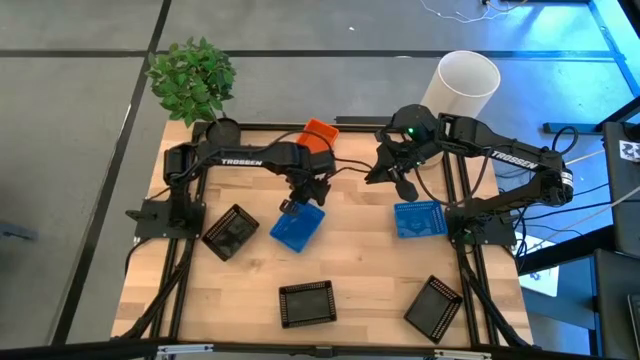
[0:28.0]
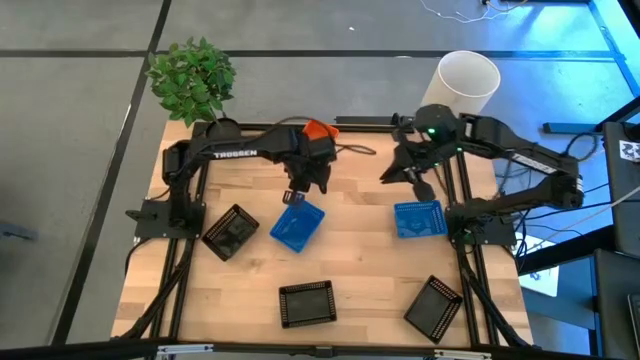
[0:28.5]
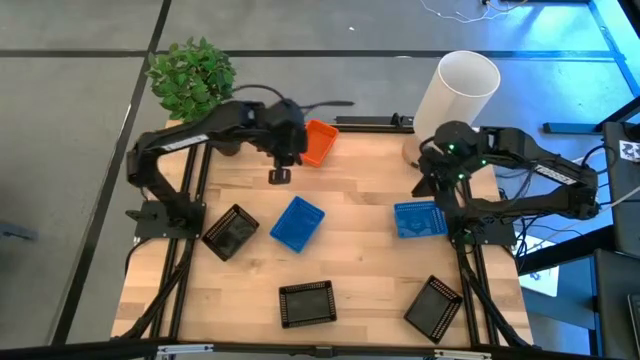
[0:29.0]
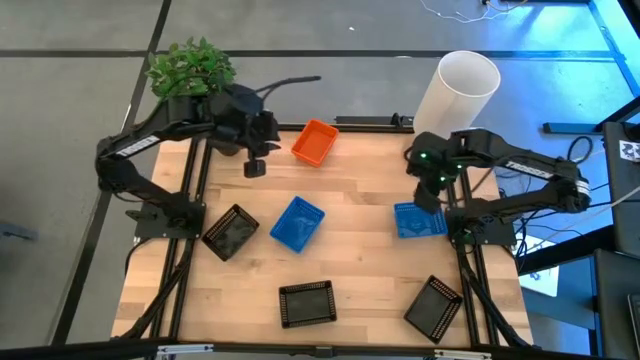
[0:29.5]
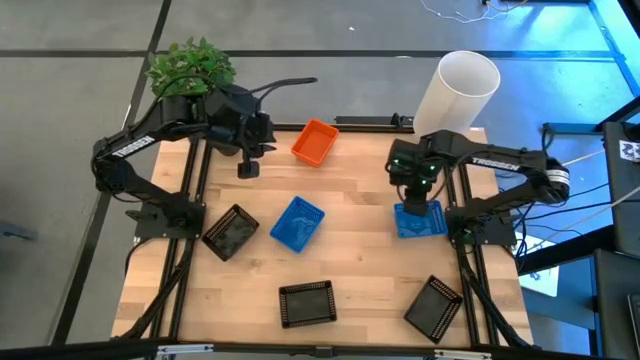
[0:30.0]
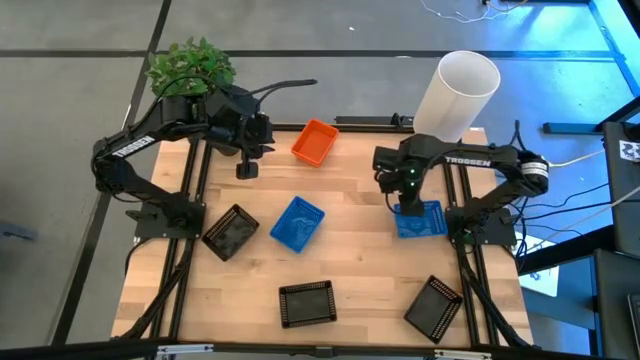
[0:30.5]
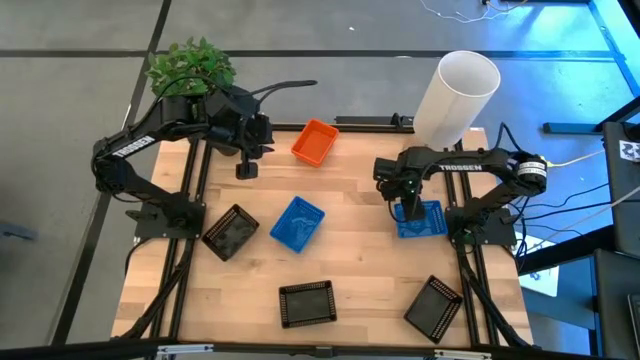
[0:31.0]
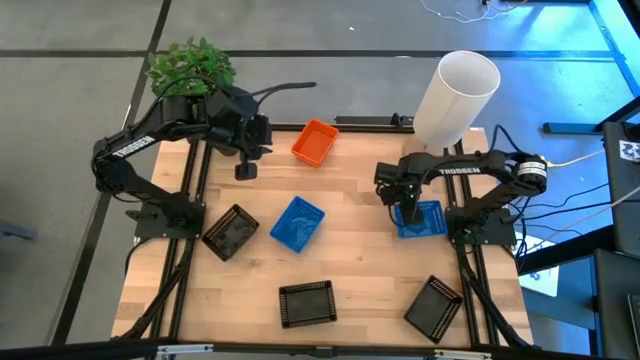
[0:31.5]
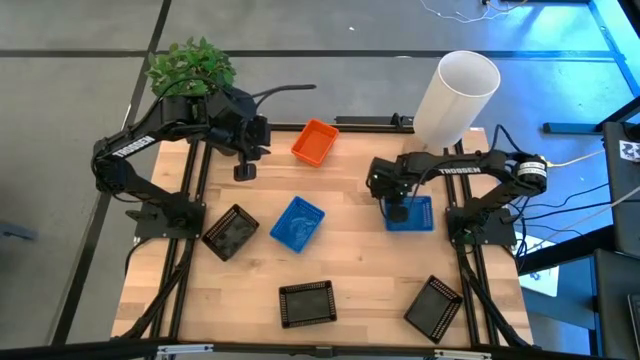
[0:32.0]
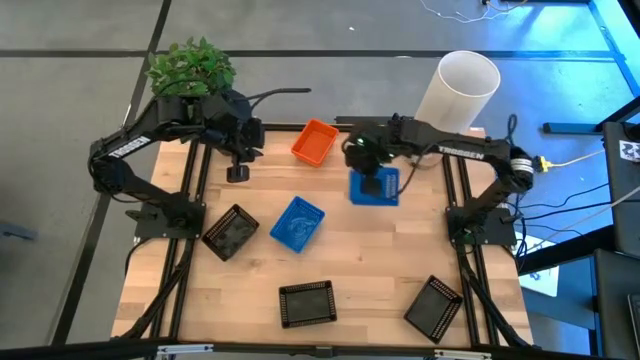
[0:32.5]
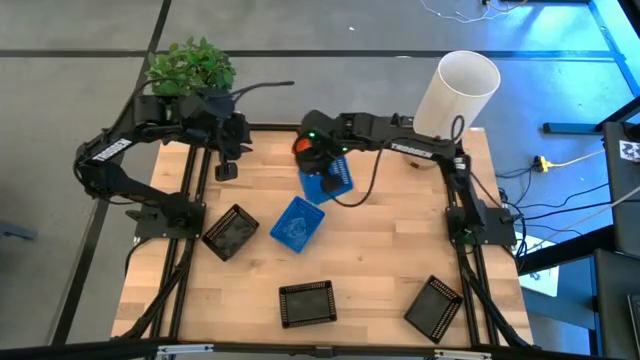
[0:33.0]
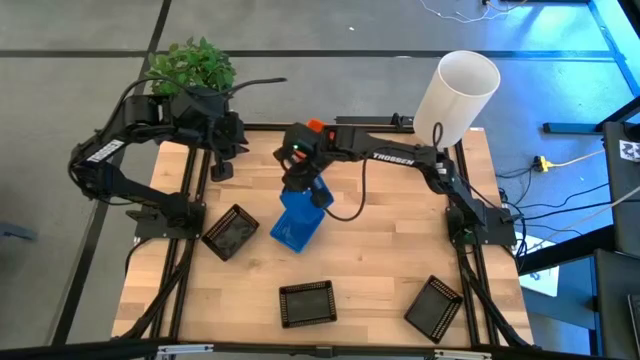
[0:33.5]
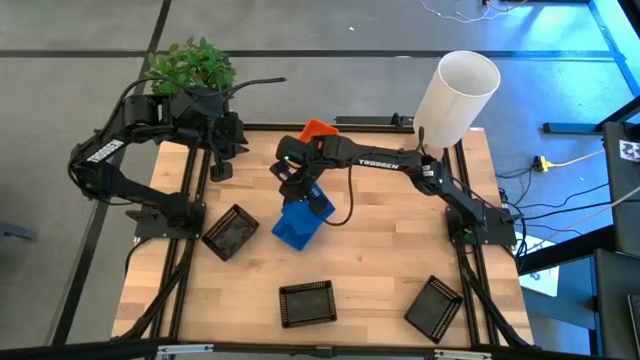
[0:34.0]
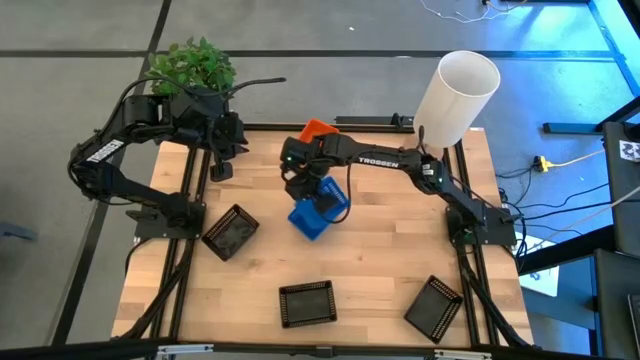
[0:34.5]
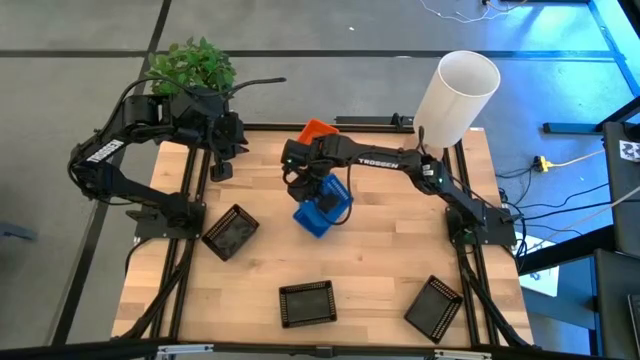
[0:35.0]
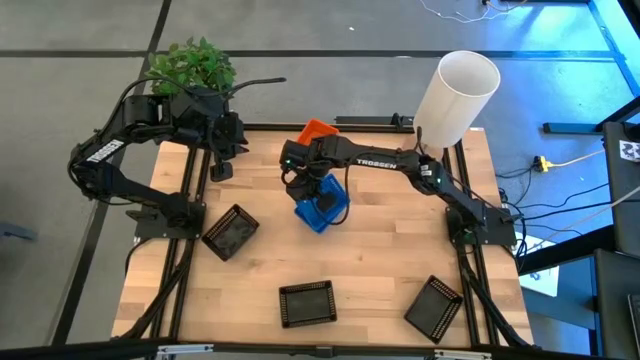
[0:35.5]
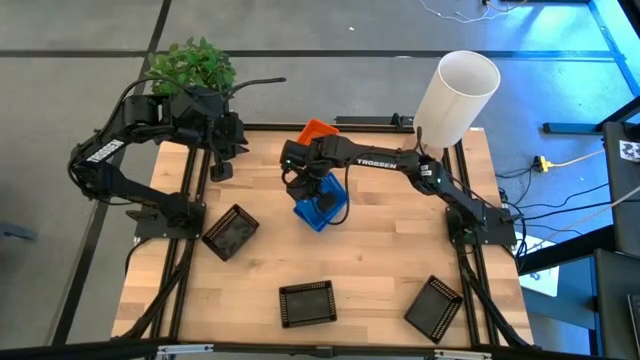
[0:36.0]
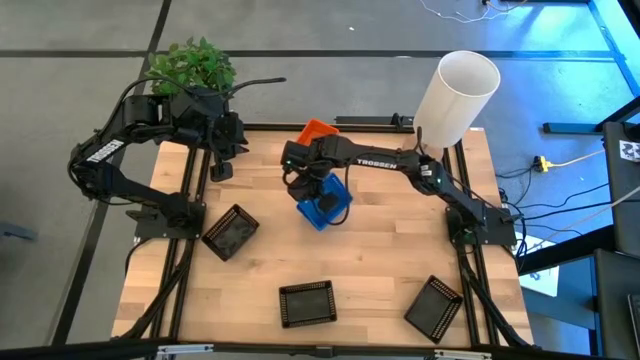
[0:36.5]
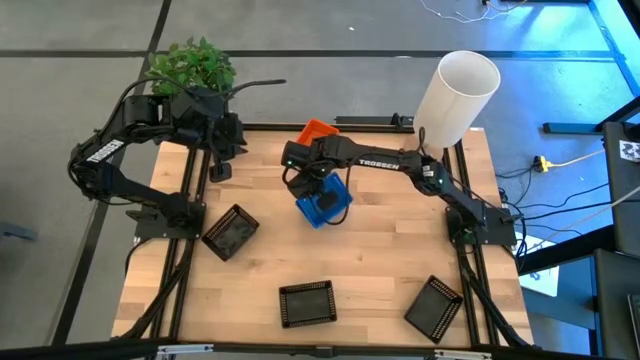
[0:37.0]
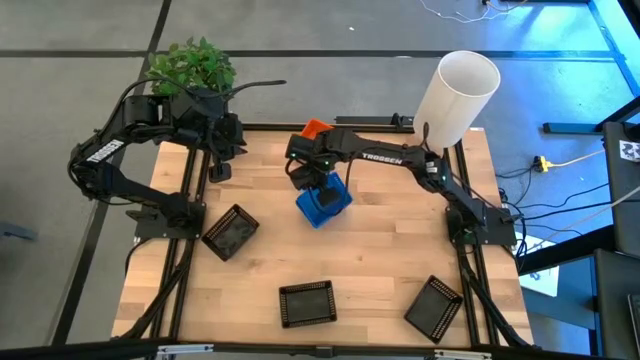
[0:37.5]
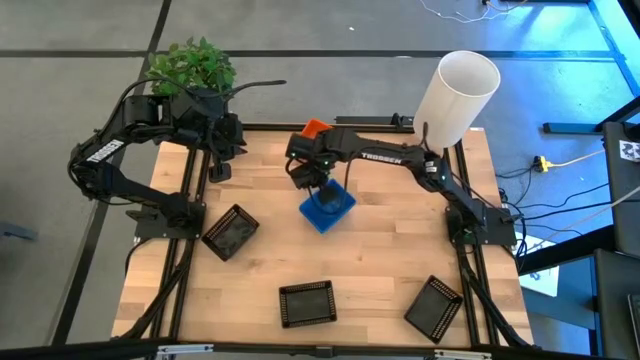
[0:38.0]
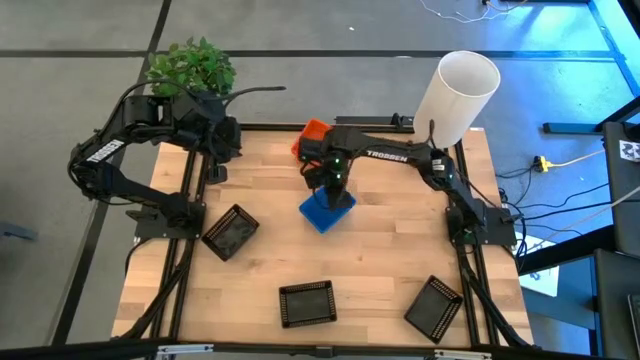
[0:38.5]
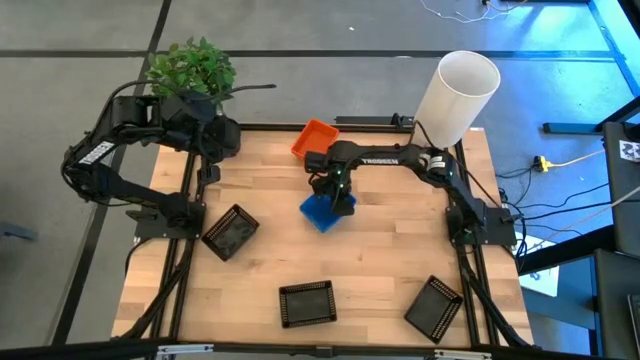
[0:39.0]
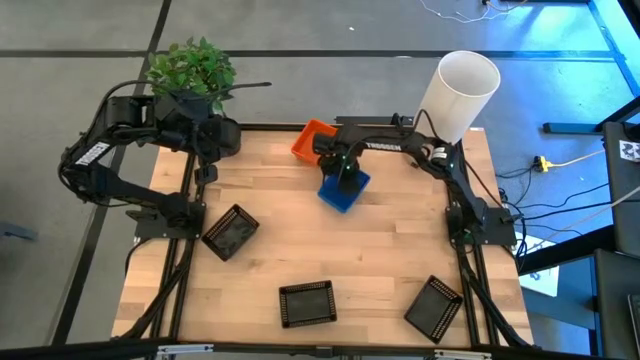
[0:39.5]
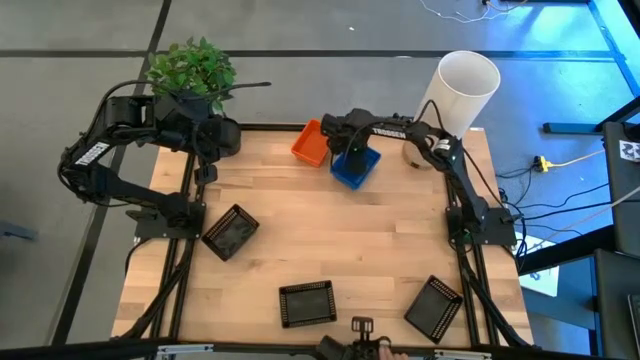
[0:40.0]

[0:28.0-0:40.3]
Stack the right blue bin on the blue bins

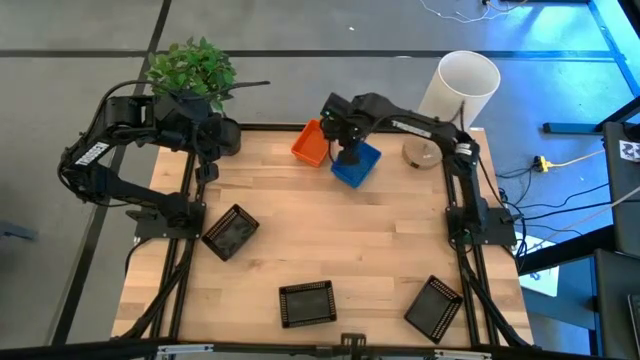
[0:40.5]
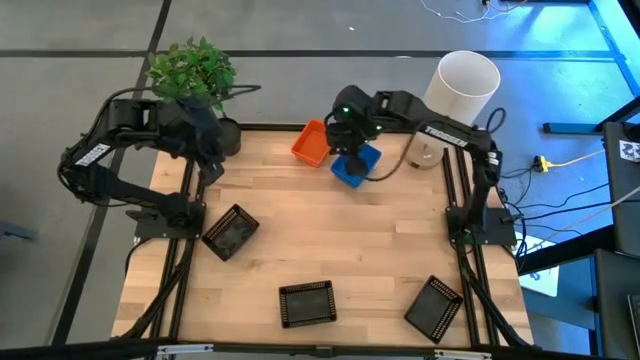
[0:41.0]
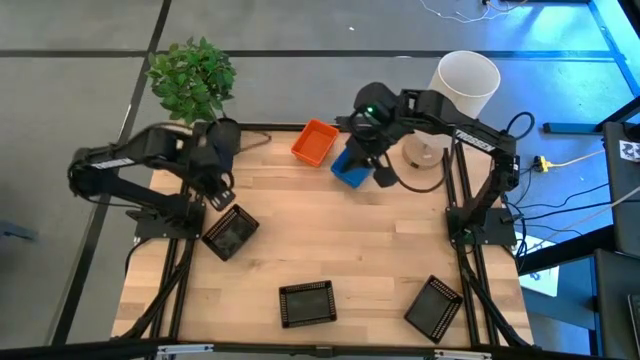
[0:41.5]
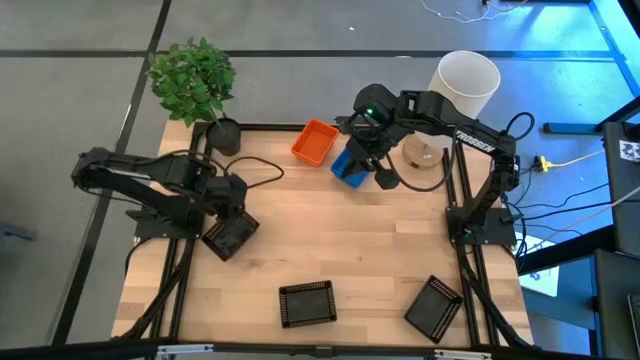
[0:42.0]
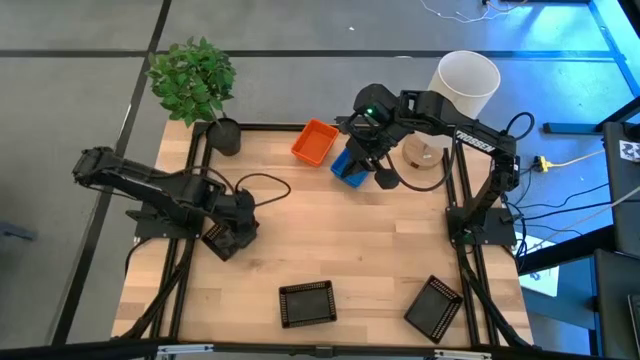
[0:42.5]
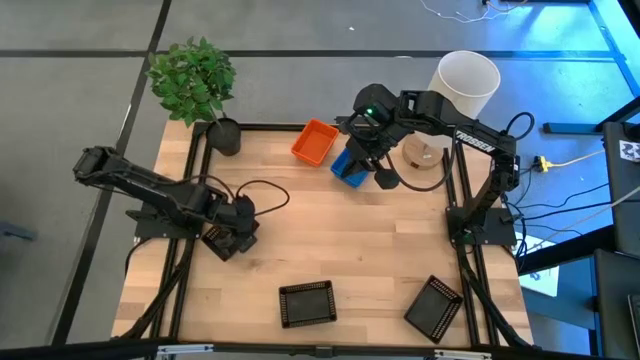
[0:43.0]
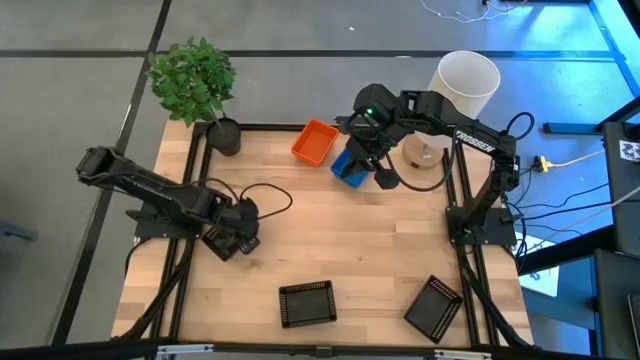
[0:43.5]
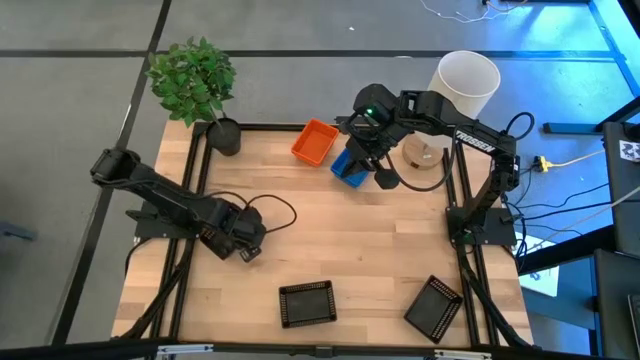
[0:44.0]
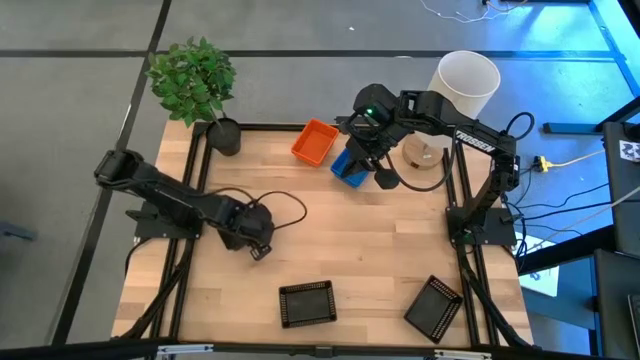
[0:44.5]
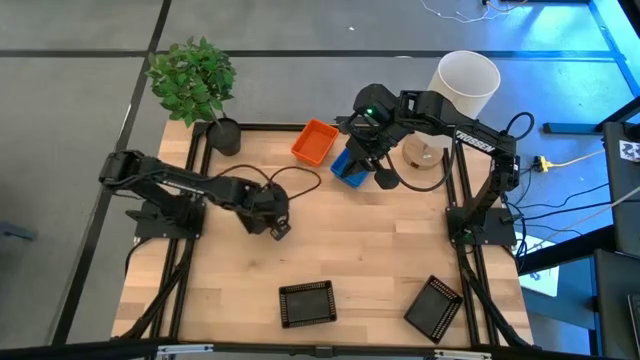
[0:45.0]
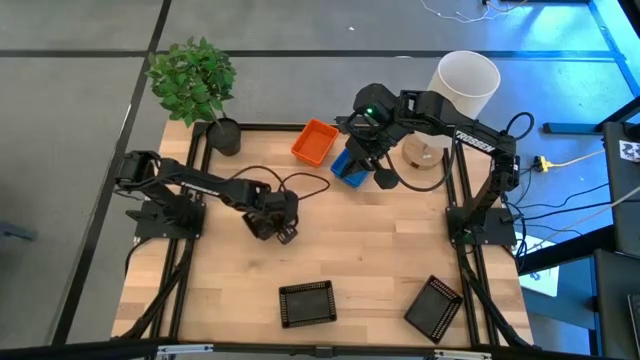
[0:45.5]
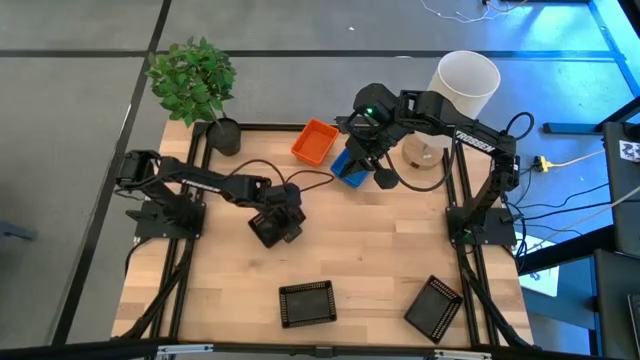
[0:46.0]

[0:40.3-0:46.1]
Adjust the black bin
